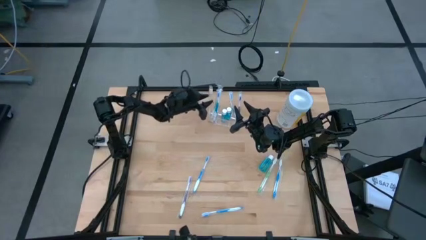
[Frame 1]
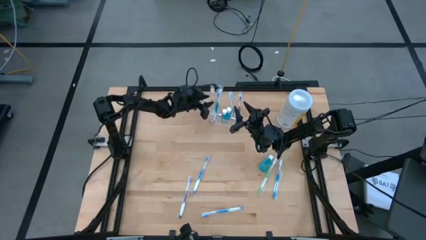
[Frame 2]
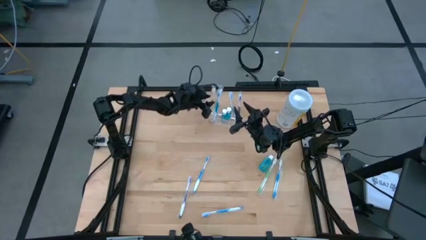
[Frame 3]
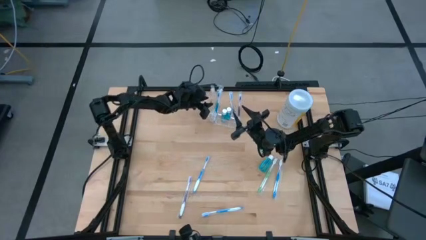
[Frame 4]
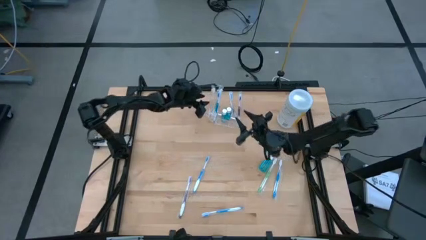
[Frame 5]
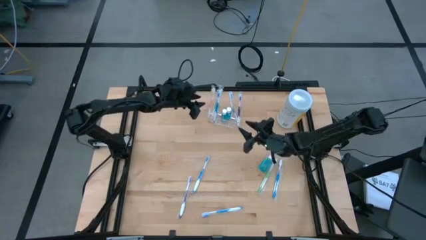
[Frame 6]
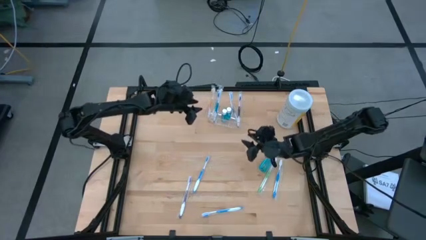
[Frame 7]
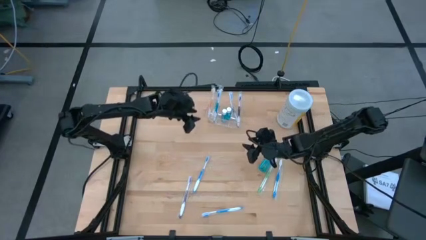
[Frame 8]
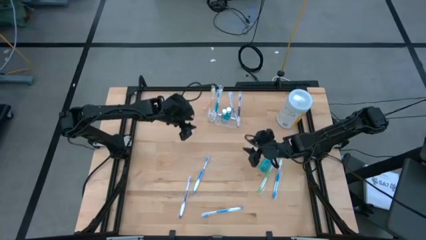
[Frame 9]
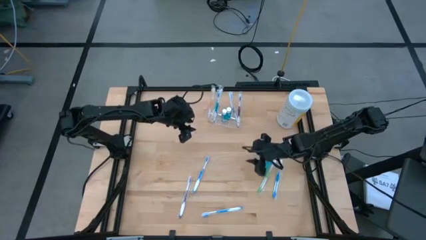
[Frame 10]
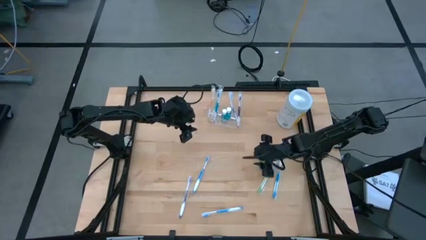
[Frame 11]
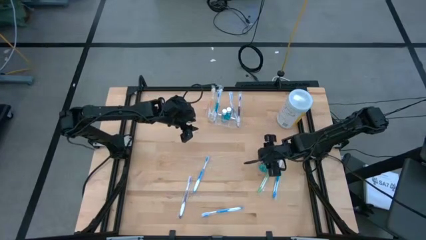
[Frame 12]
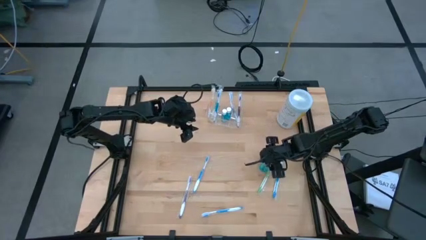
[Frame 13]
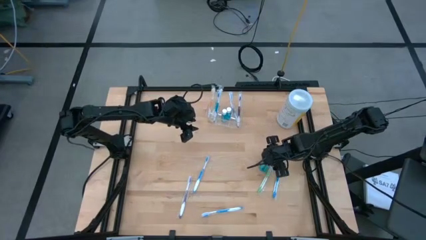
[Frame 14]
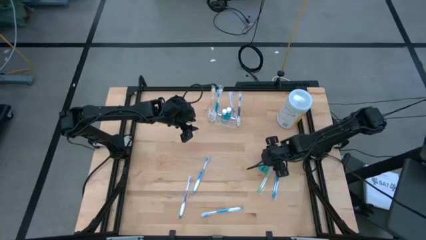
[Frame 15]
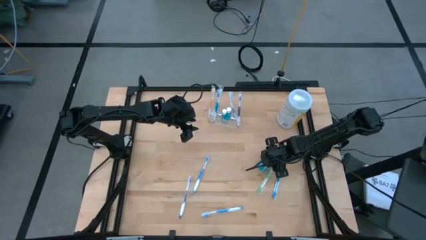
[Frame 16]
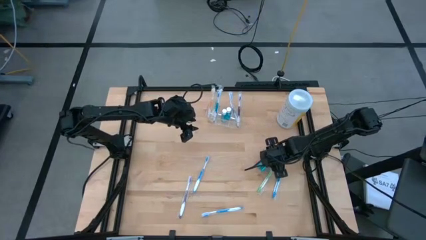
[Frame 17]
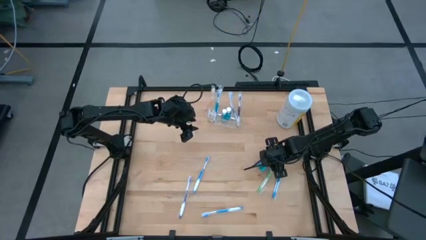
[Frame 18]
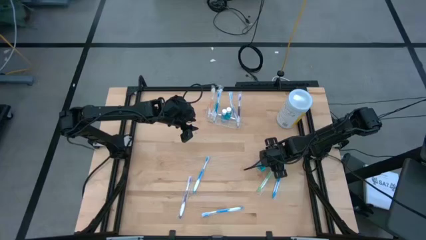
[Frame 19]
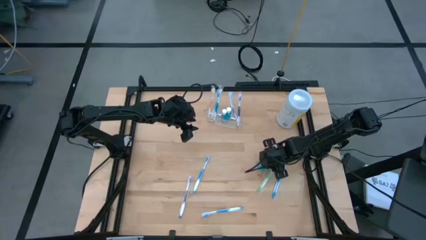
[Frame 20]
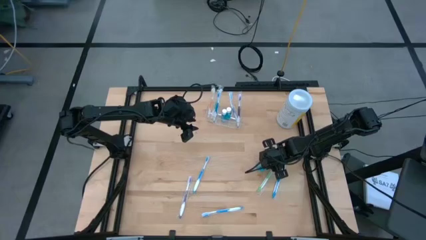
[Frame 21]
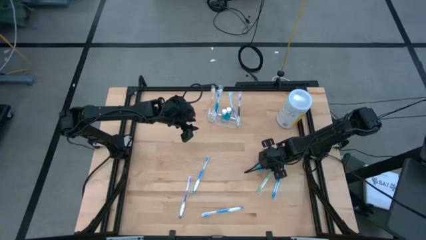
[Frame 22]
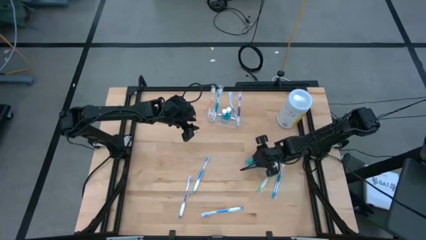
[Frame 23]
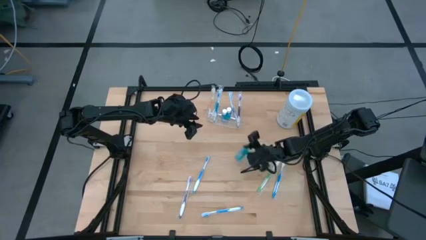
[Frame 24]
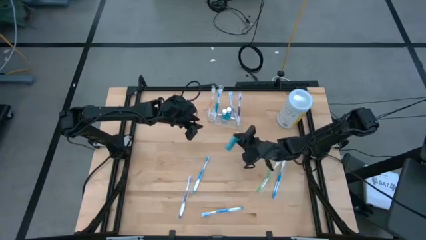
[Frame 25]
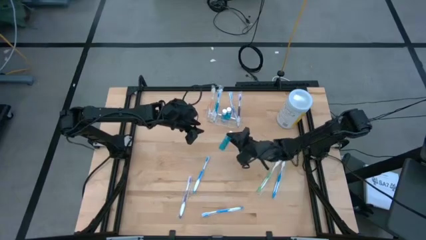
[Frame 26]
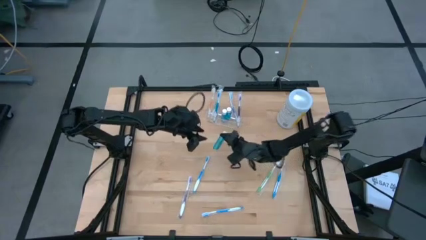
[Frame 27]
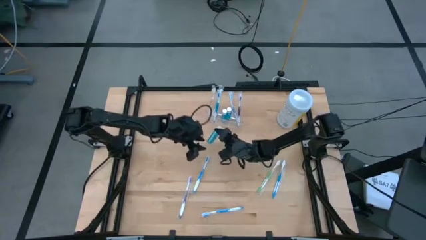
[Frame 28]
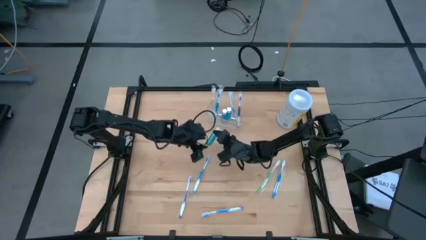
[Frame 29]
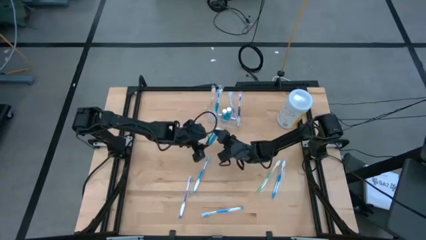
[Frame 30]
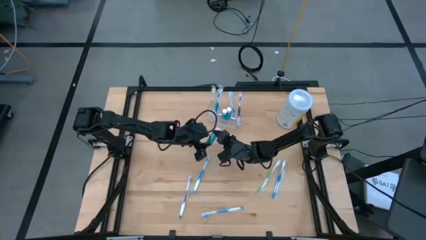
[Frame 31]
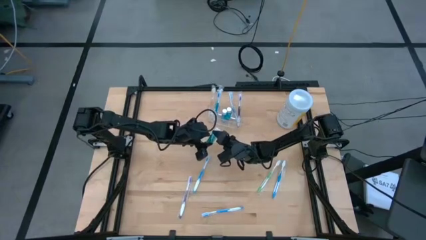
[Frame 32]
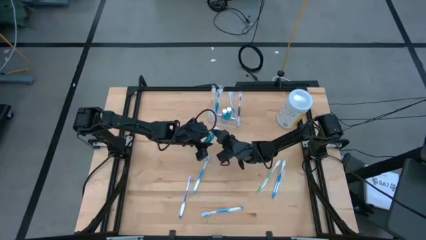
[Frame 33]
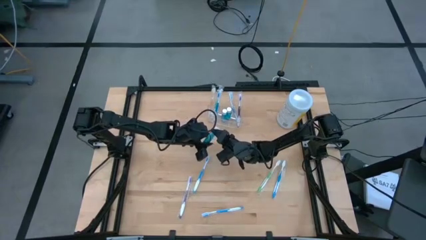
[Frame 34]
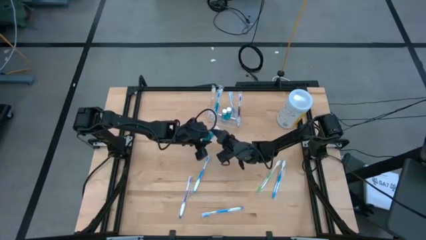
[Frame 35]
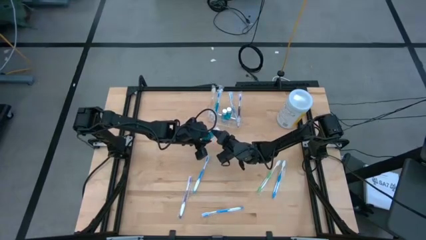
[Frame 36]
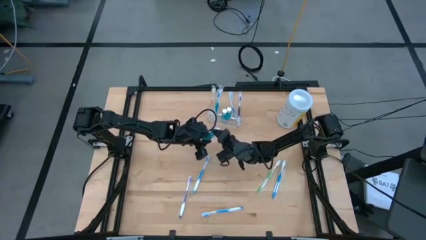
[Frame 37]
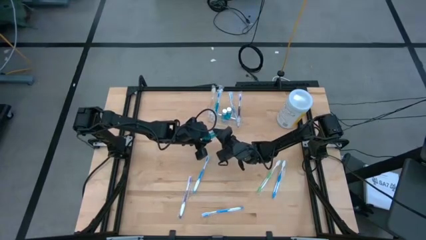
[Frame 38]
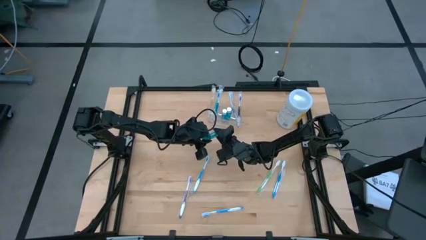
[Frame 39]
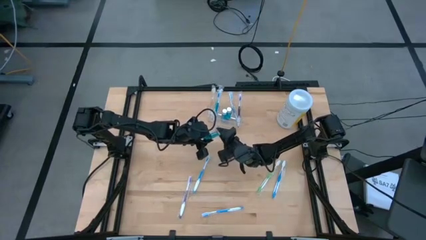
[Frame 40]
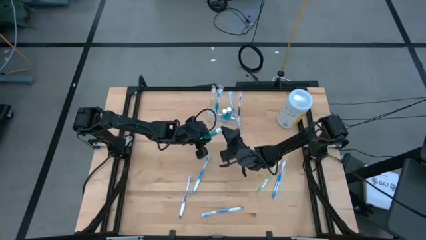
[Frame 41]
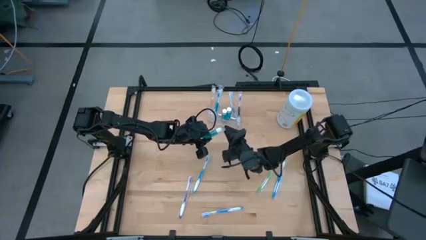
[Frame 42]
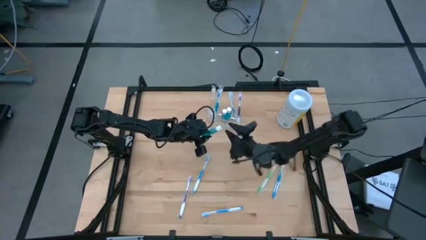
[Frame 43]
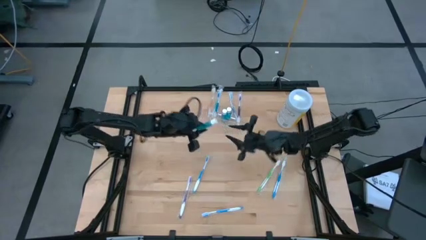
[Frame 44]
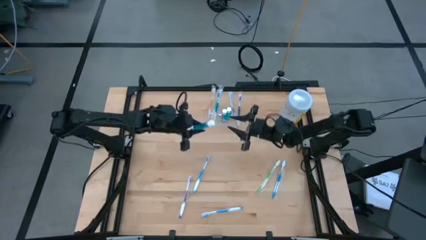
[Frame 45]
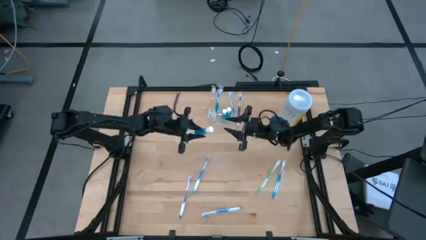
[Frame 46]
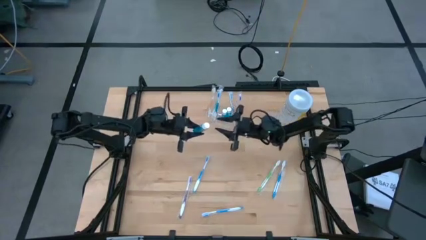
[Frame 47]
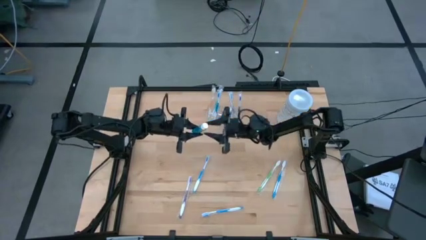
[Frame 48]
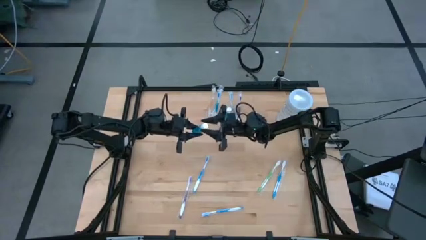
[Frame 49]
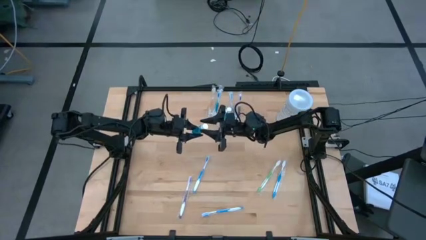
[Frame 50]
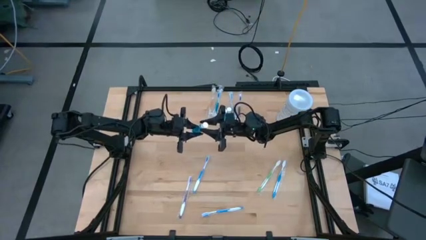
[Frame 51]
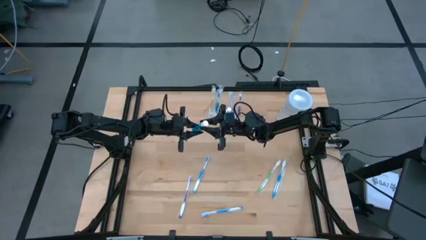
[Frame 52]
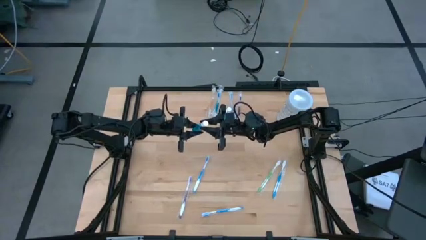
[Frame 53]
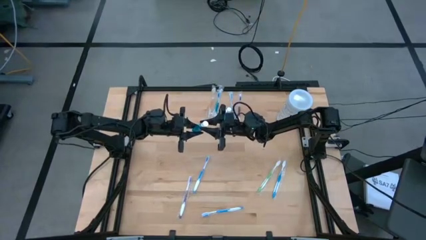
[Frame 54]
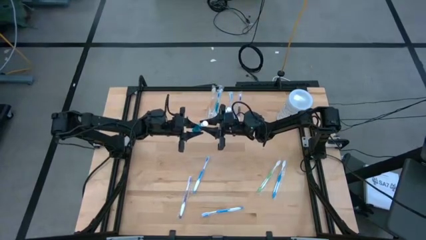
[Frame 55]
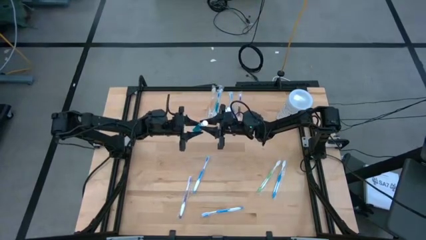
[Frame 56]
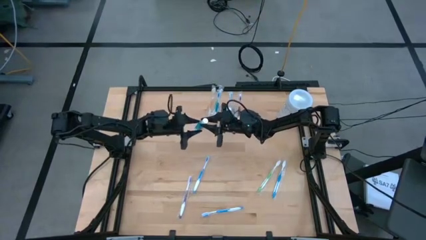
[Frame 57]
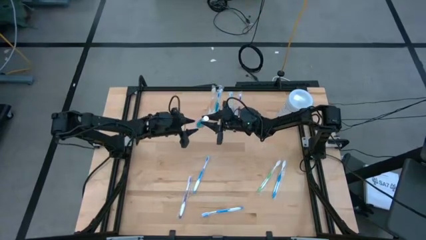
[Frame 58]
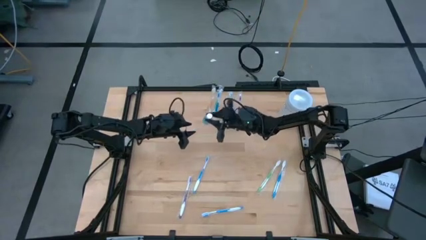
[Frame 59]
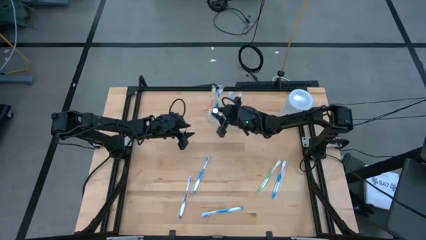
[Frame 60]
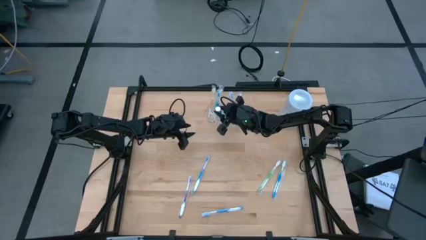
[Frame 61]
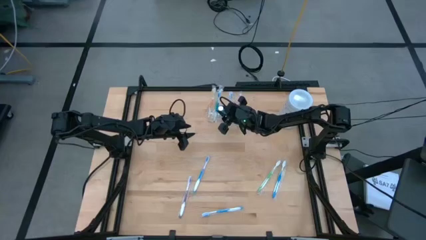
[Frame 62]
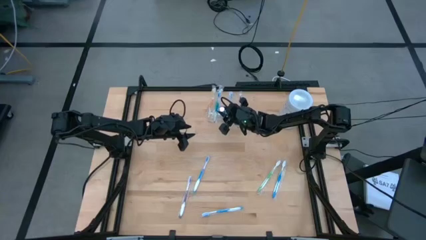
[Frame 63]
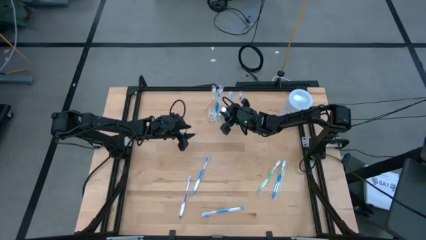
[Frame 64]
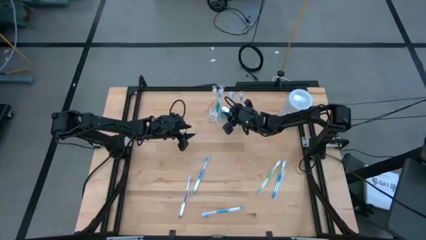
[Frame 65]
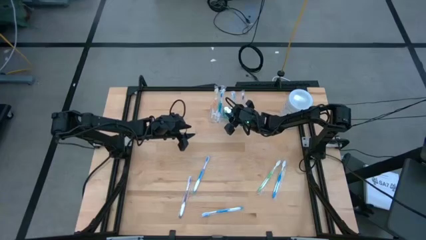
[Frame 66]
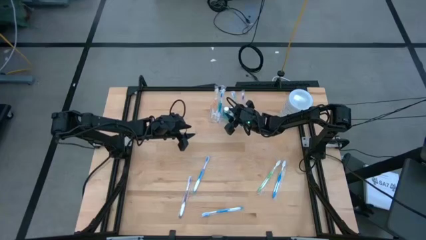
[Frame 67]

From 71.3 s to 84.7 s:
Task: Pick & Place toothbrushing station
Put the mouthwash into the middle section of the transparent organizer
